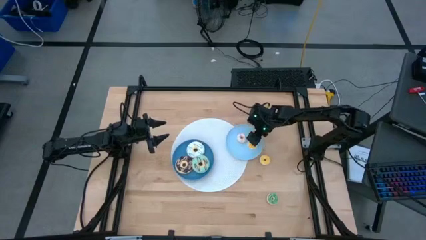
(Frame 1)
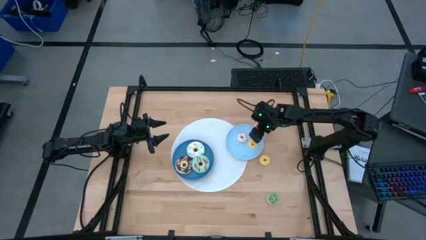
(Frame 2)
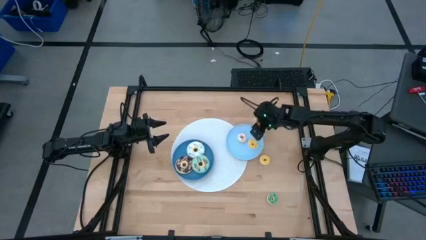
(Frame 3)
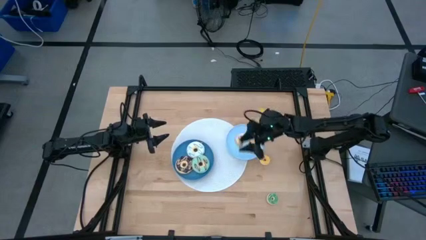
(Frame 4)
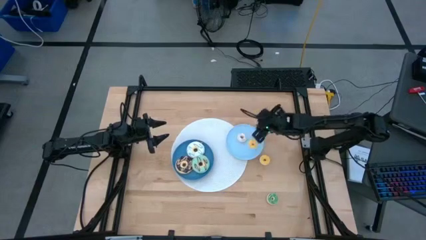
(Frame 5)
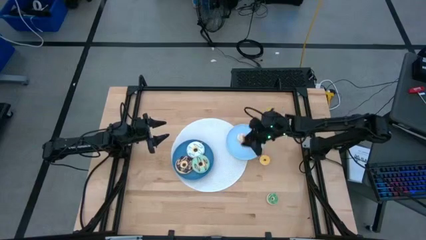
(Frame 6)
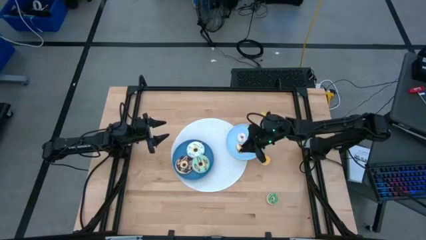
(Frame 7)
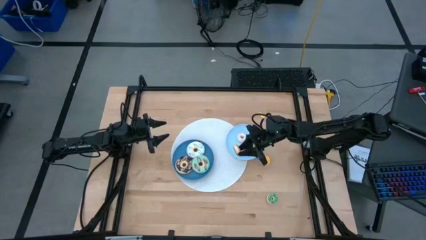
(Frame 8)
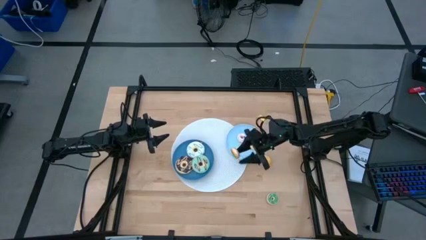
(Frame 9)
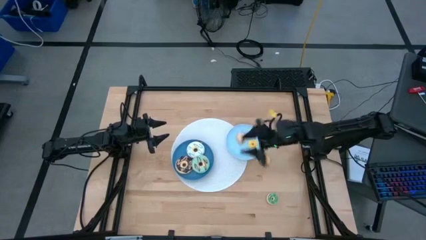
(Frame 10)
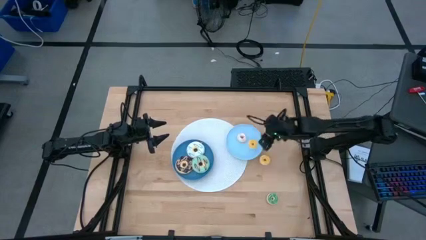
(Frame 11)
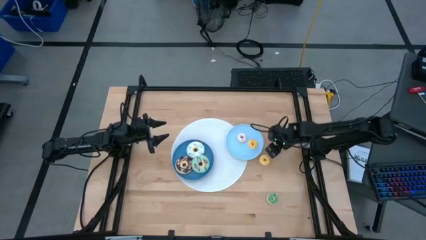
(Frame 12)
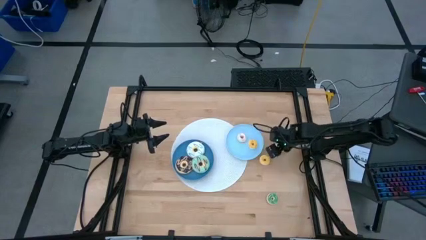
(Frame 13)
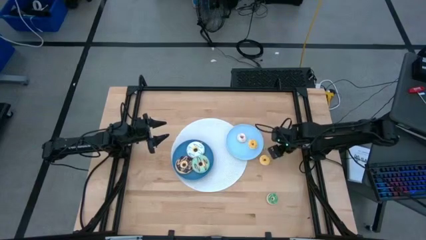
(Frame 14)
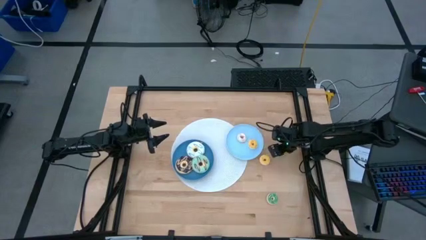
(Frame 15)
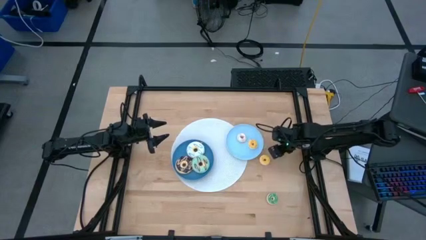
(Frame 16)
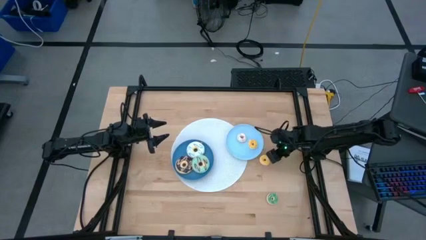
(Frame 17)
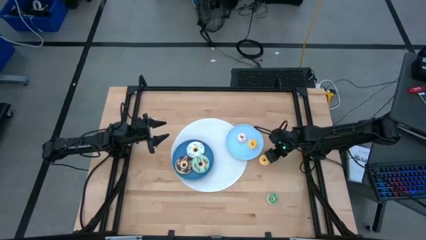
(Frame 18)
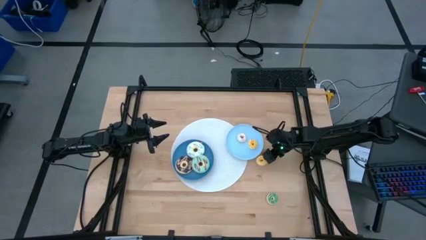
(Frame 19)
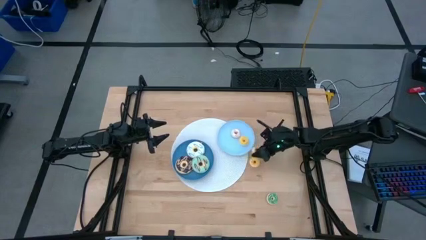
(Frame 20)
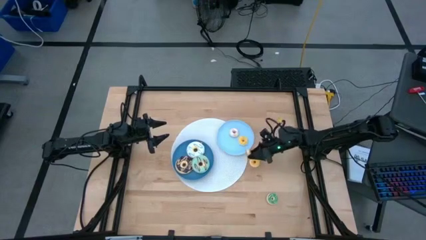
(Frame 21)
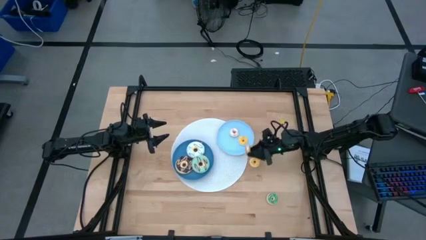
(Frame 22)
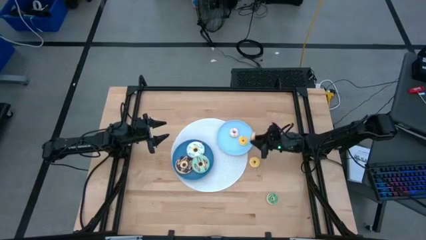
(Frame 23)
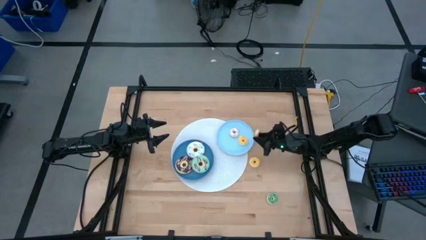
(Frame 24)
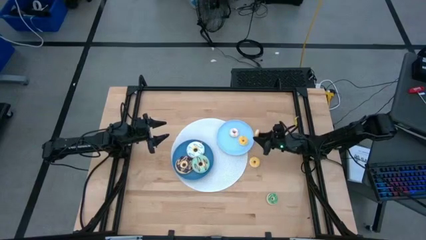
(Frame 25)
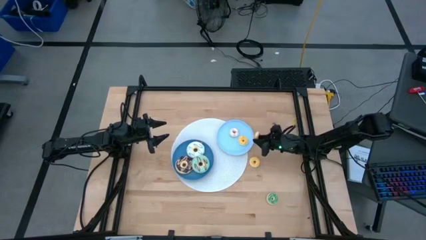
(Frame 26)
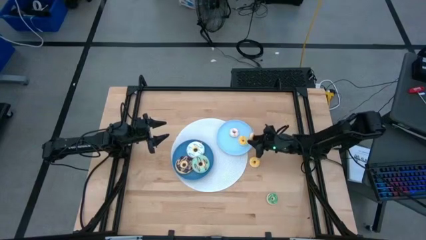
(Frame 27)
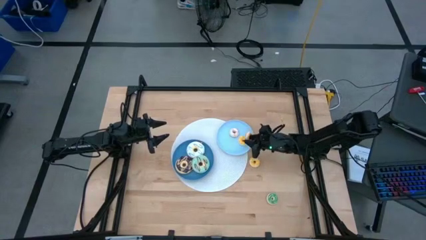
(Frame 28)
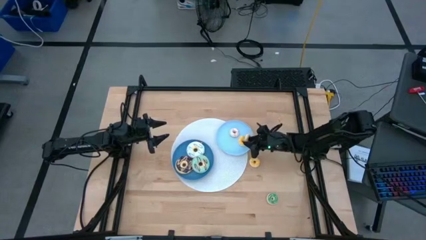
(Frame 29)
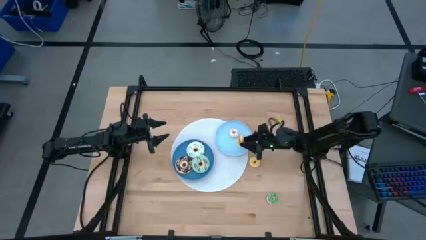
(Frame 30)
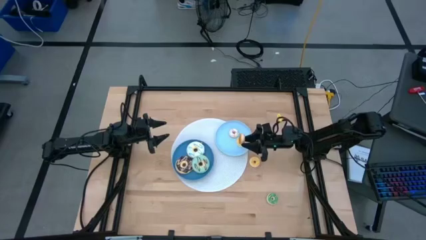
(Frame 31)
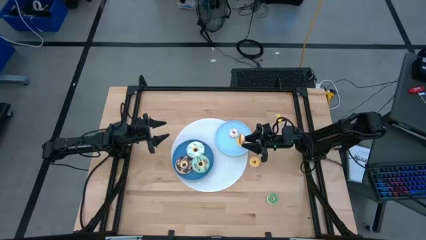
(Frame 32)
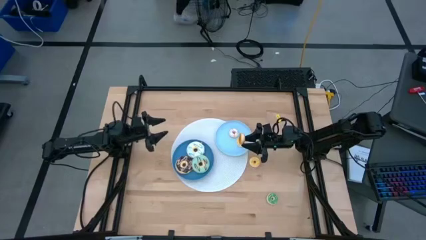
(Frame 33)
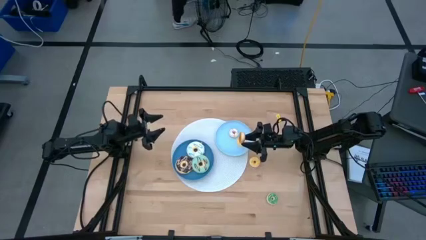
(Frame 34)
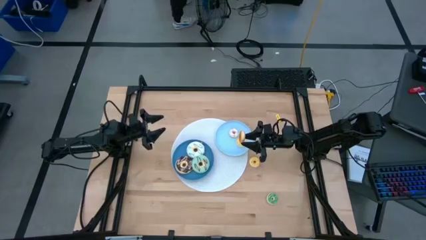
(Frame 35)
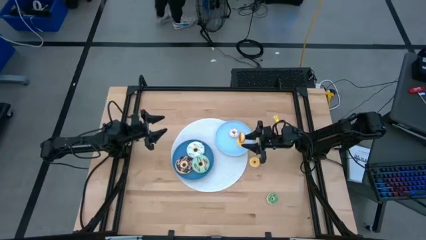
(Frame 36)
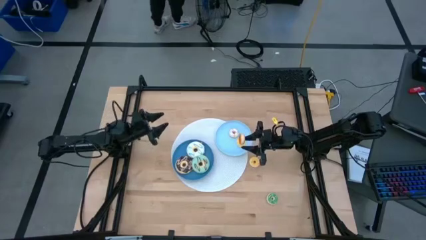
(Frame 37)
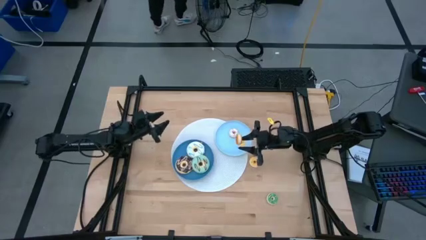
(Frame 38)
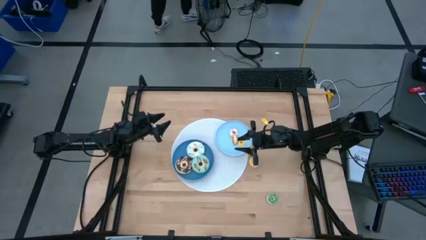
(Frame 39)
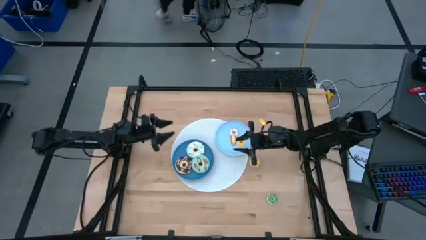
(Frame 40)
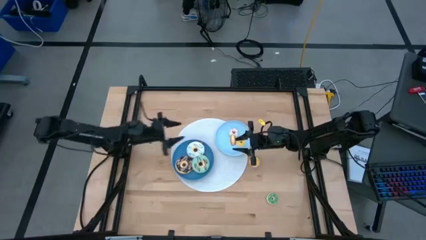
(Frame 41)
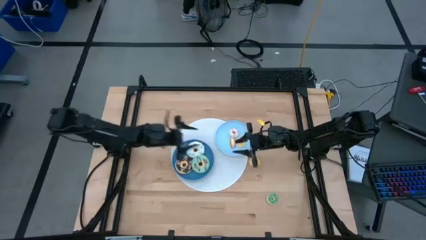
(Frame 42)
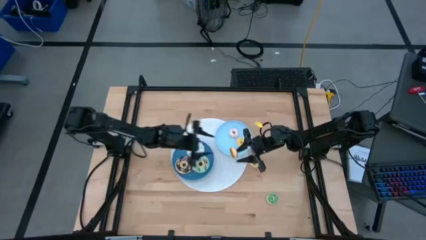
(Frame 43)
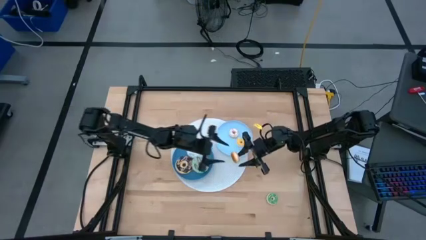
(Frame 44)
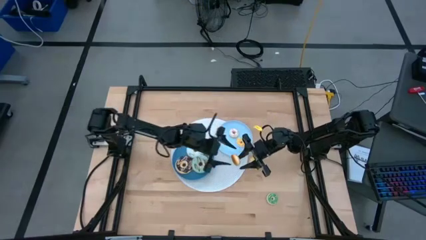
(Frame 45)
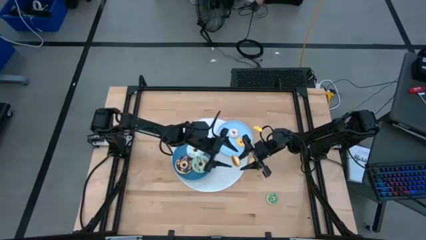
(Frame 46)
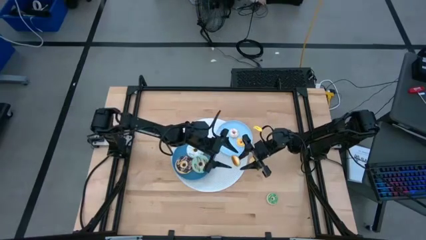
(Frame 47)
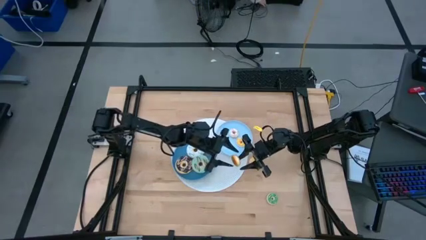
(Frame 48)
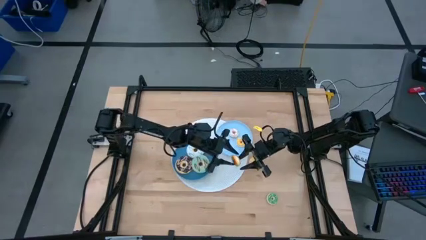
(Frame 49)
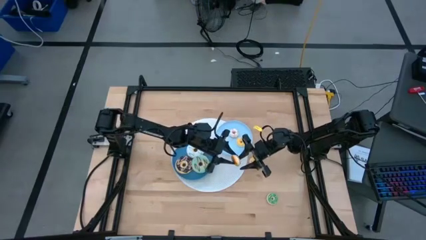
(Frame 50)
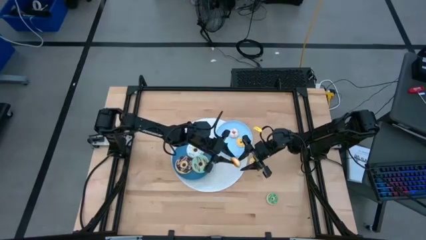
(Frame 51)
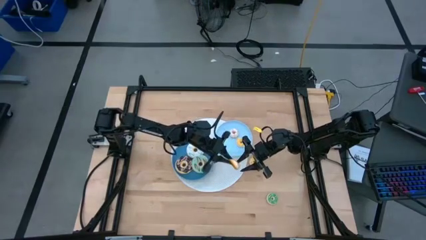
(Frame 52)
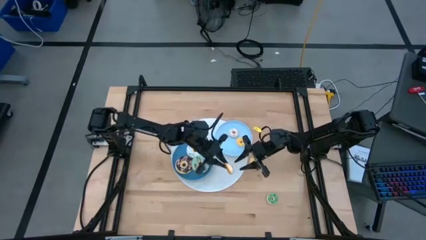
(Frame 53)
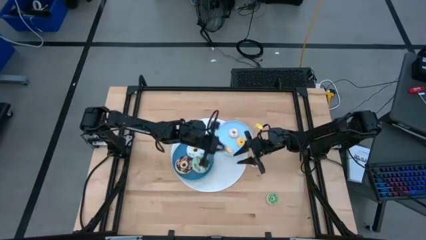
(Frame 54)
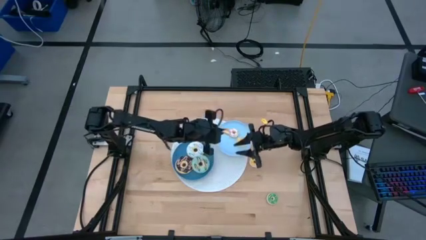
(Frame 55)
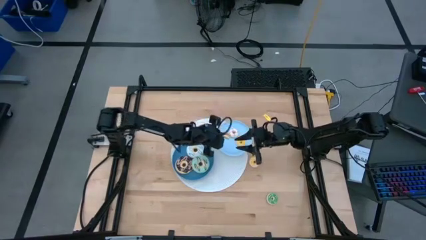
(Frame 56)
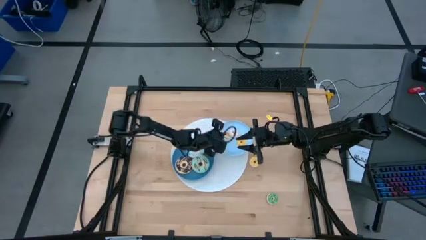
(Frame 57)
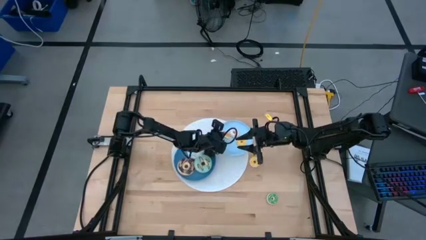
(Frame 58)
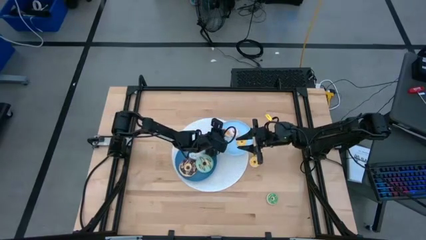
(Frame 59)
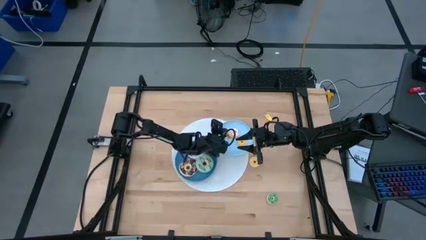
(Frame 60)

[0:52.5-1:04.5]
Task: Pick & Place donuts
Put the small orange donut on the light blue plate

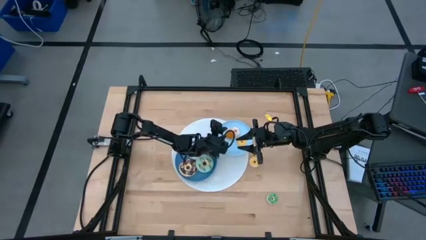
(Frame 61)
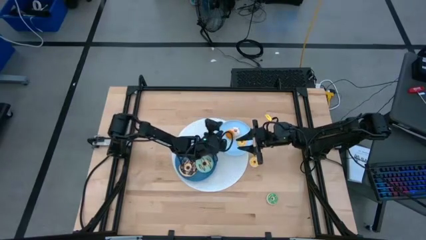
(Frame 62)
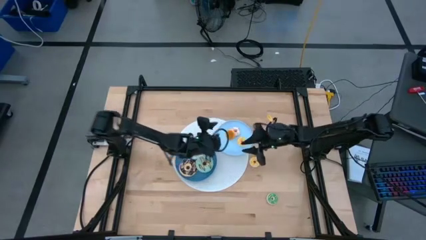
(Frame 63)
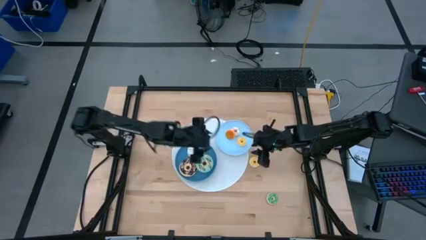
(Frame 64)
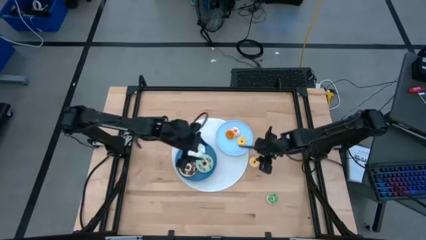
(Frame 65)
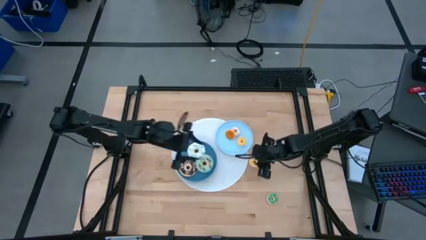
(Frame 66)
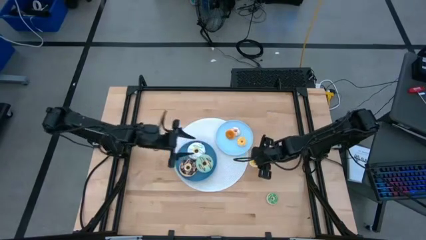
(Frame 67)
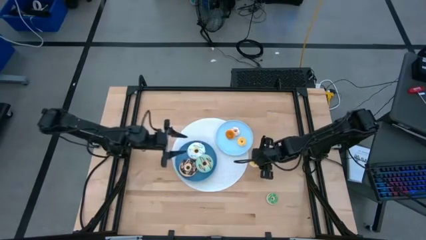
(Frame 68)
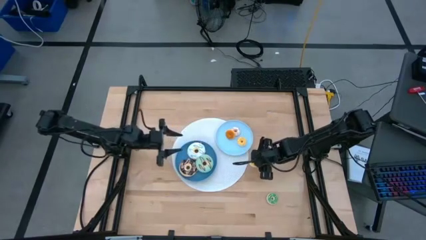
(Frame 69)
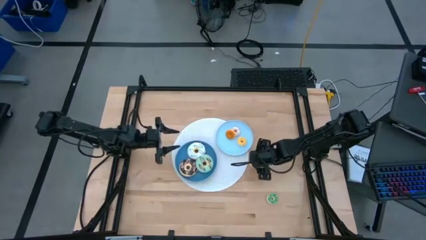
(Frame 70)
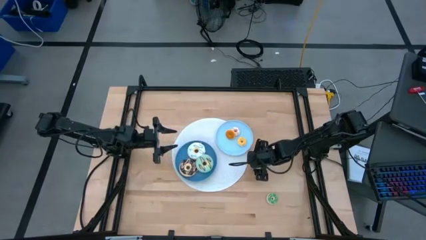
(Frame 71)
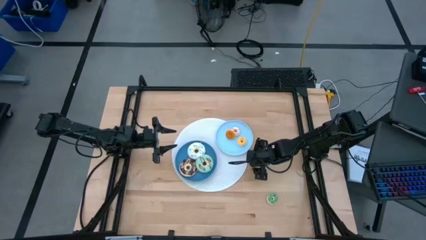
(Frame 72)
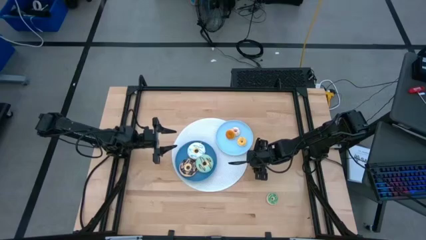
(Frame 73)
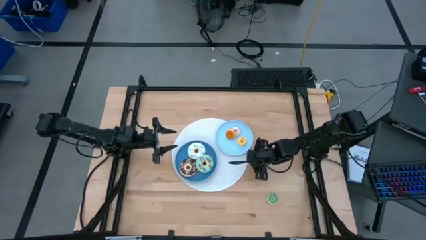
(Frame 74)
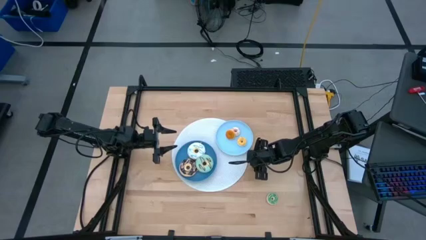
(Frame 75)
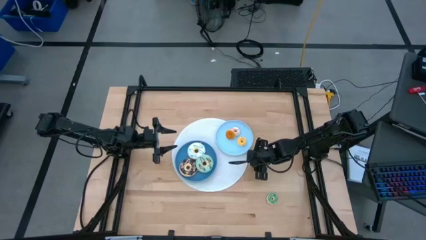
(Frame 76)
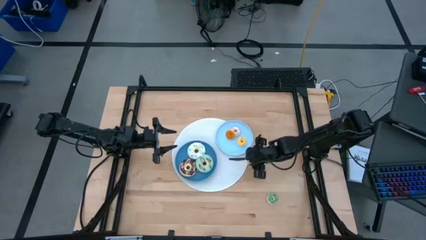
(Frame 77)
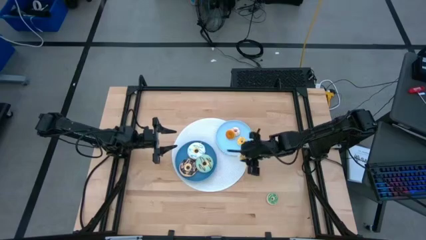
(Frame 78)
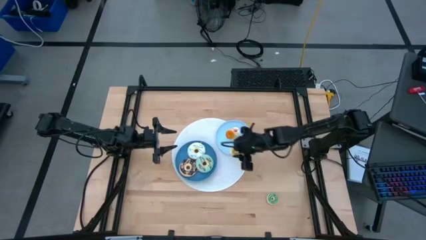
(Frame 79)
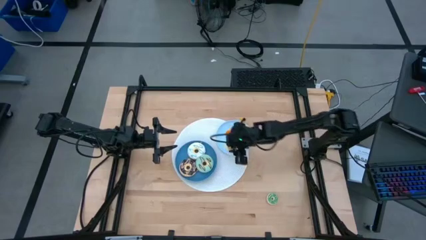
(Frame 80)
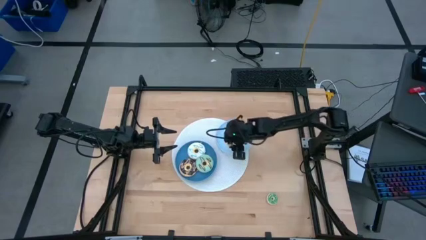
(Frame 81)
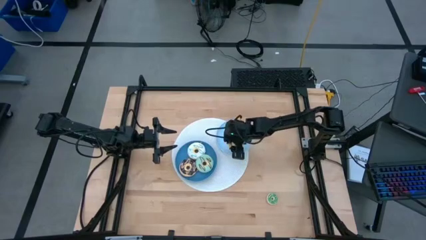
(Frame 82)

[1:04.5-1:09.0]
Put the small yellow donut on the light blue plate
